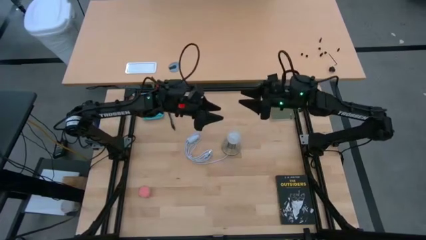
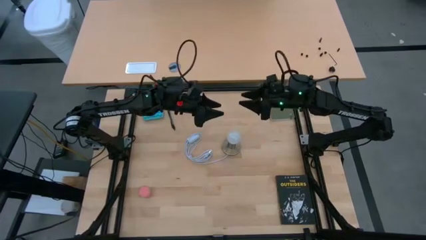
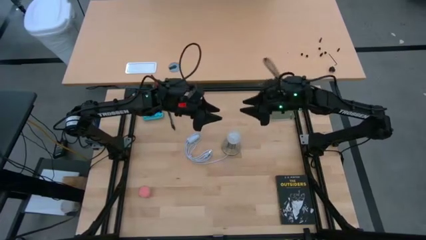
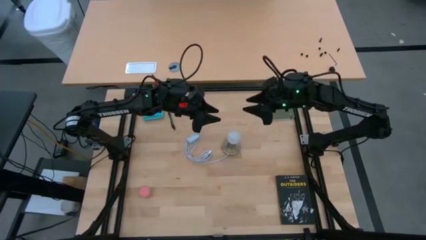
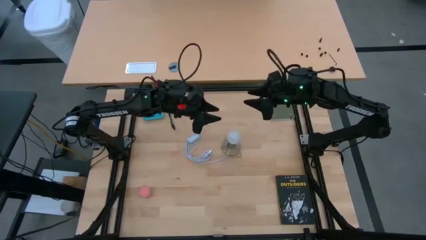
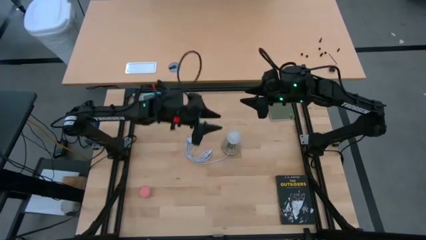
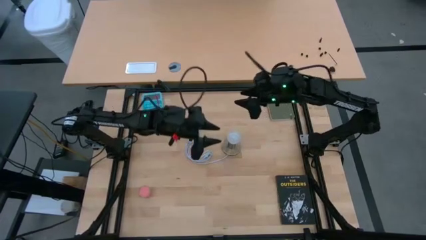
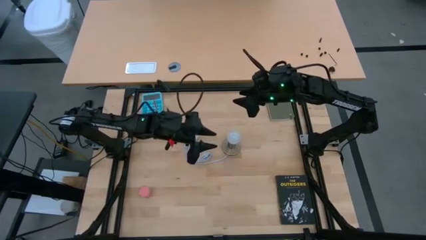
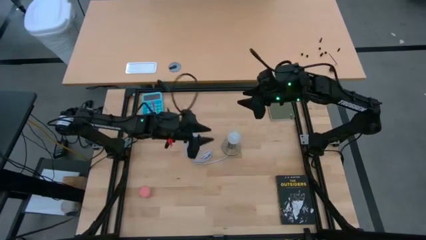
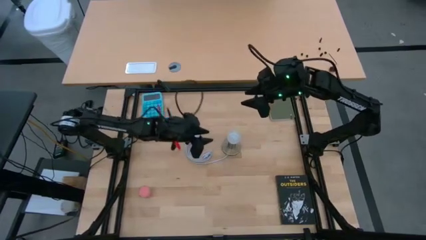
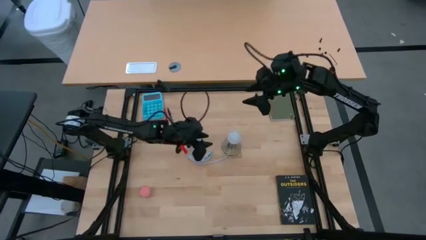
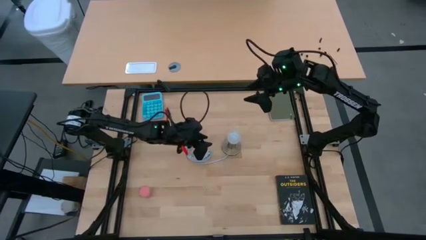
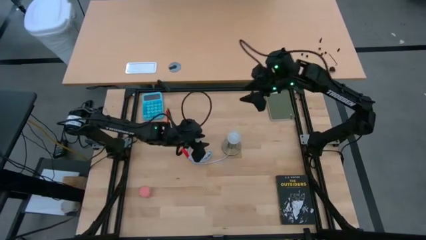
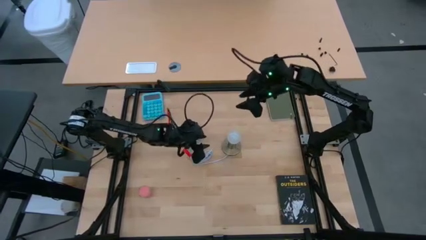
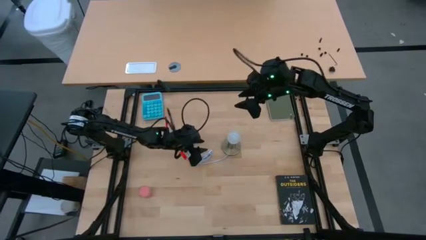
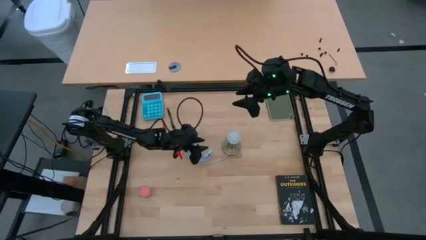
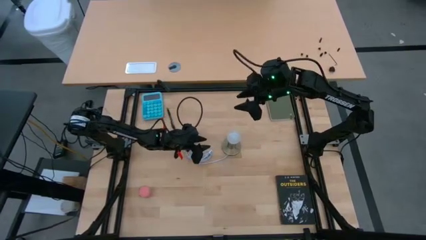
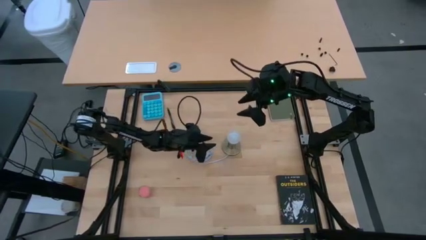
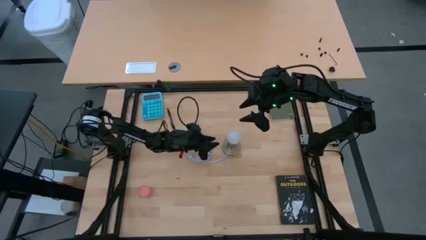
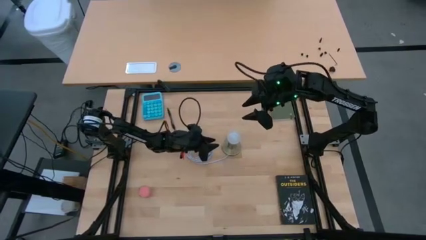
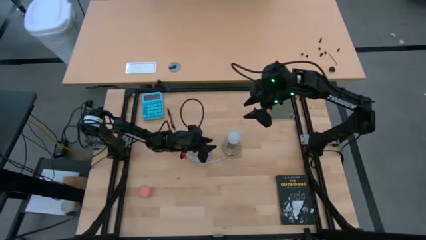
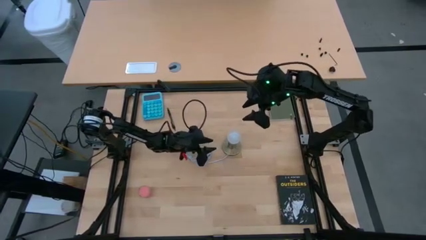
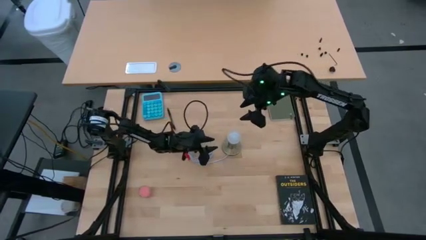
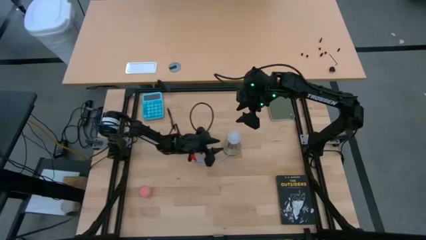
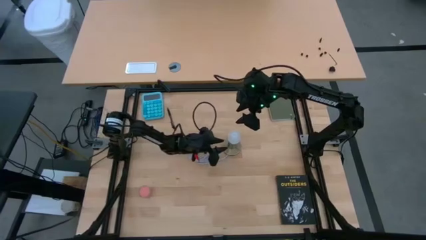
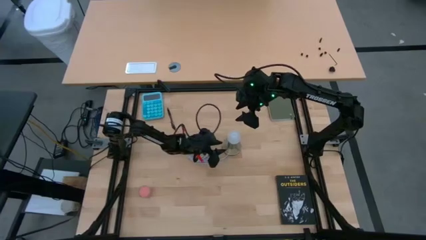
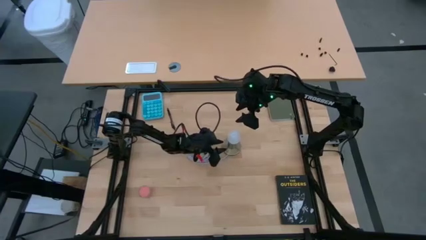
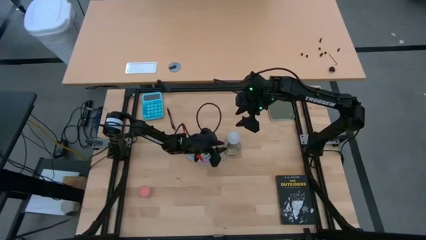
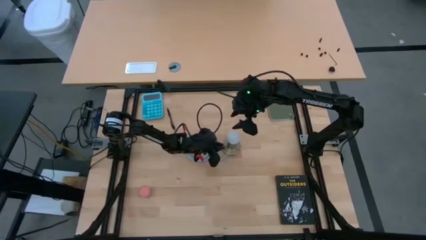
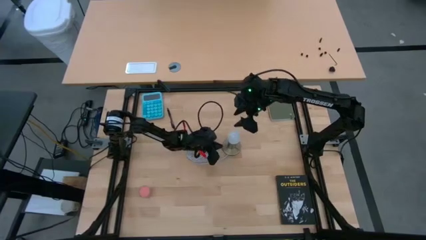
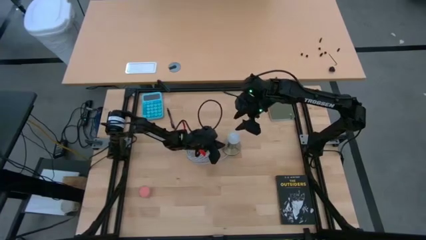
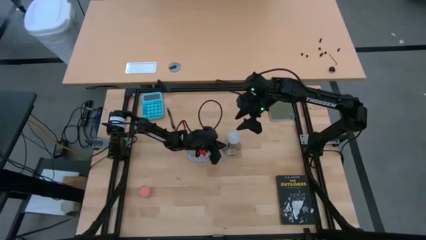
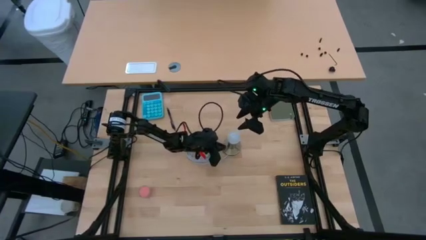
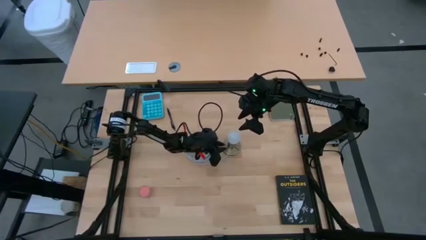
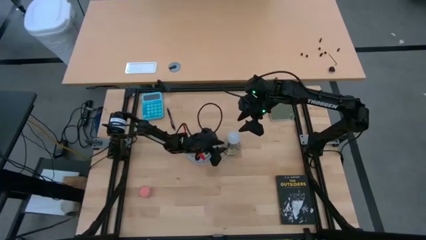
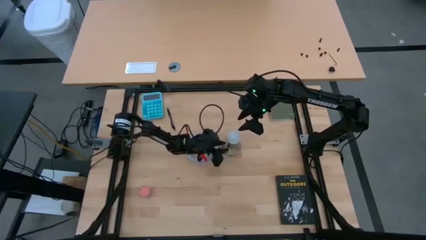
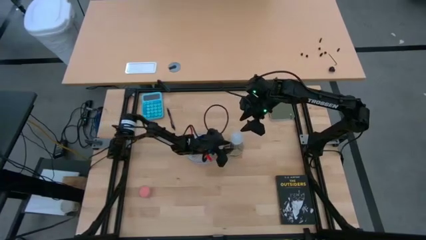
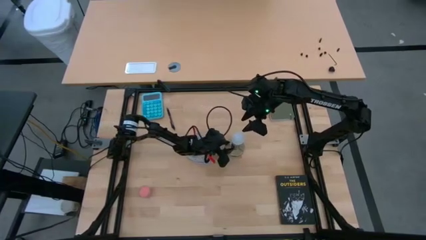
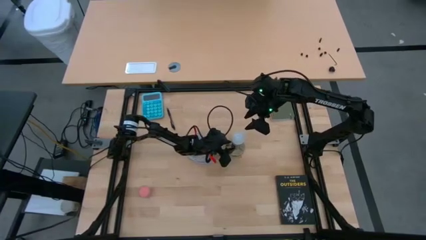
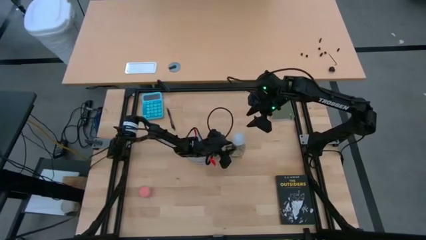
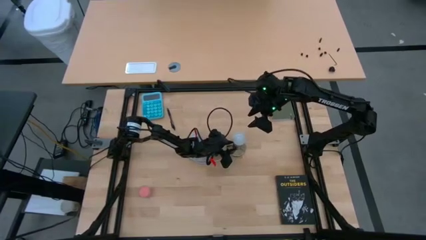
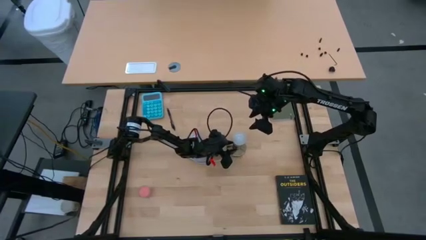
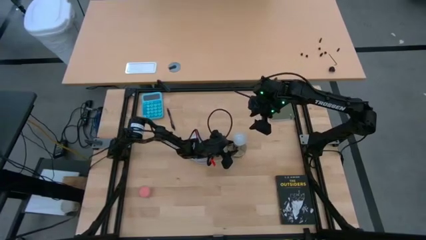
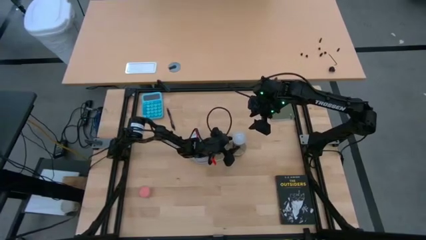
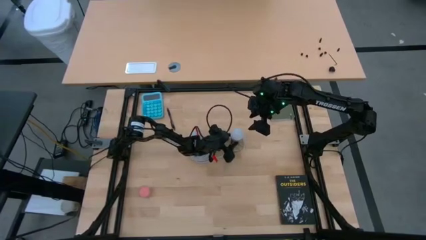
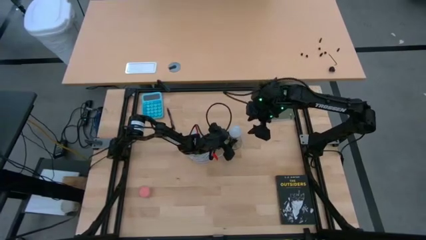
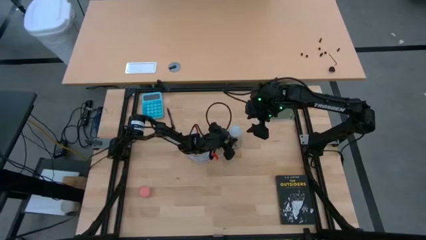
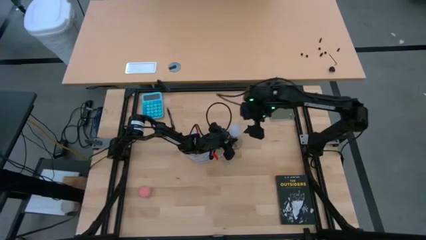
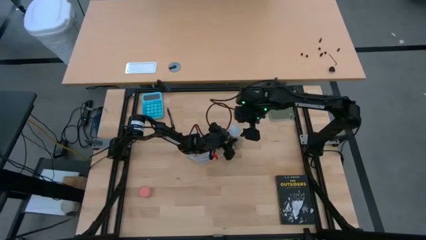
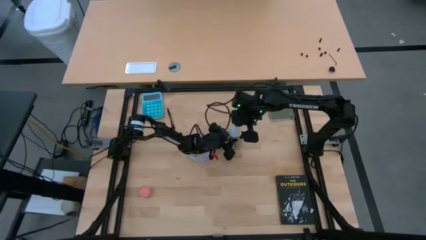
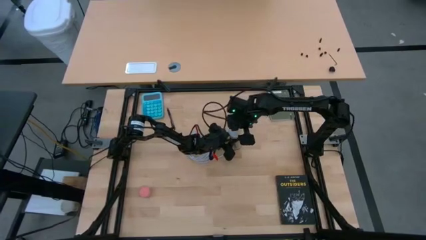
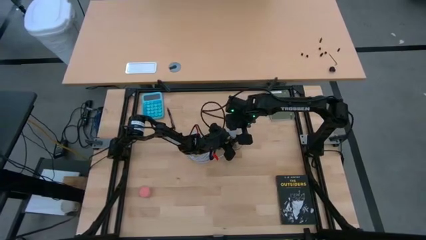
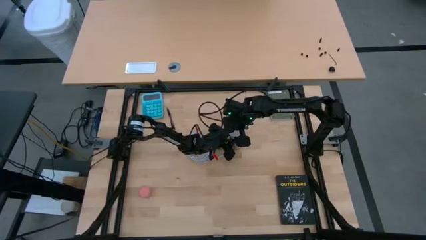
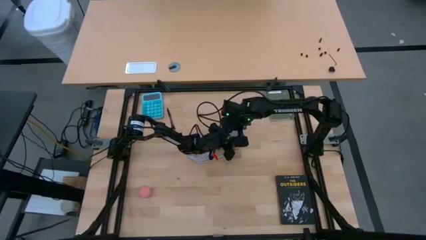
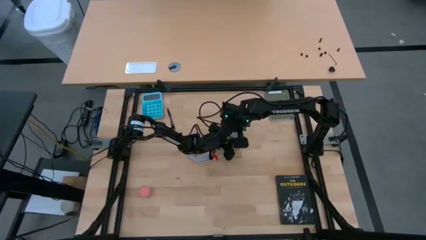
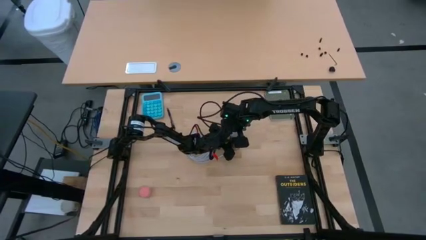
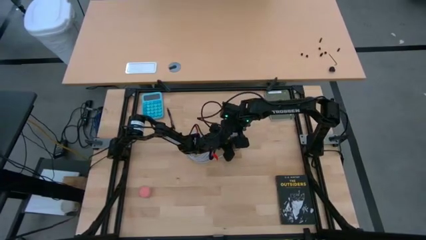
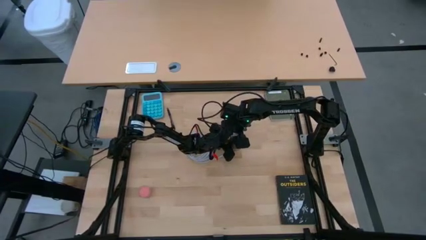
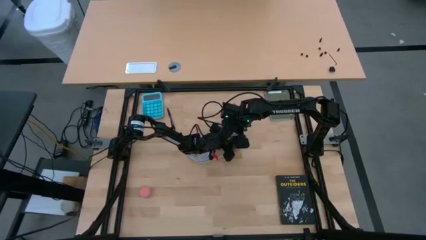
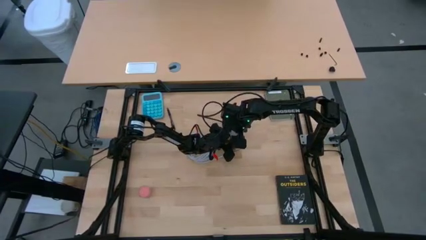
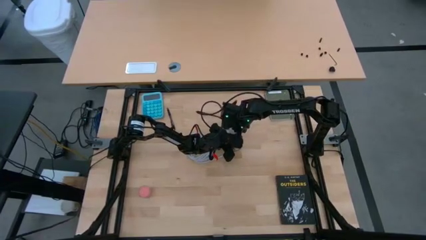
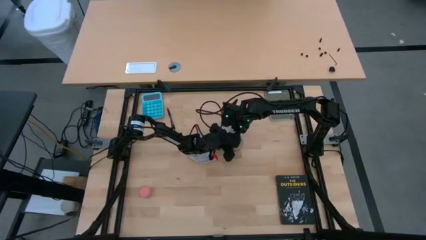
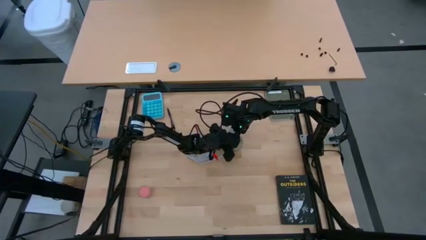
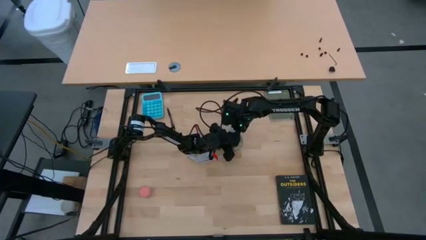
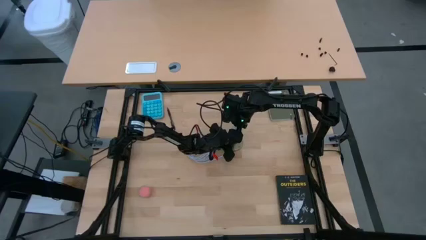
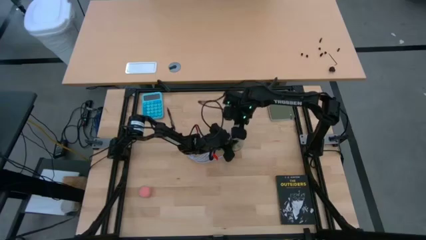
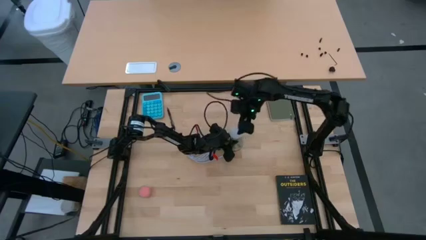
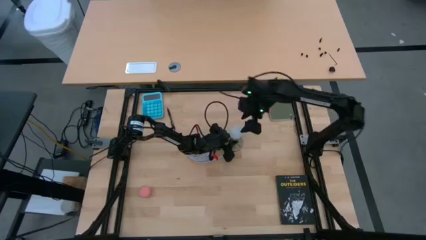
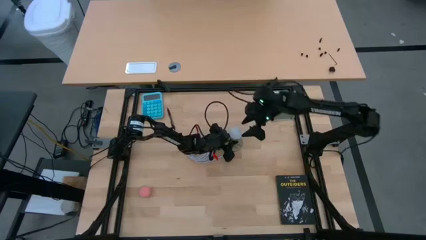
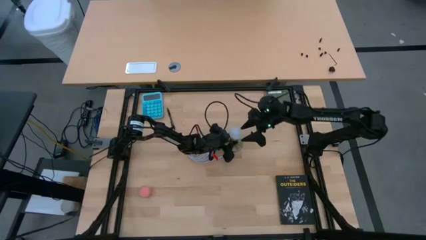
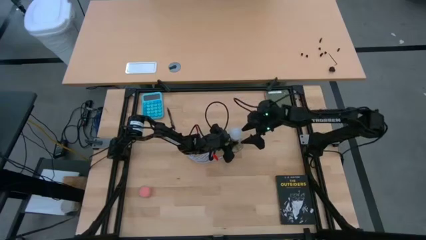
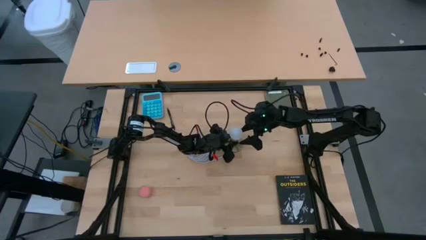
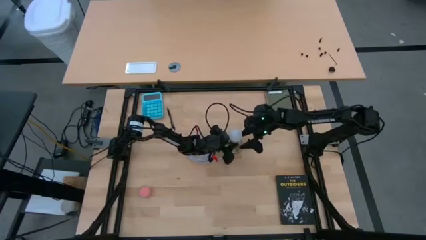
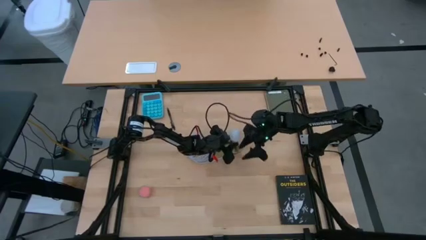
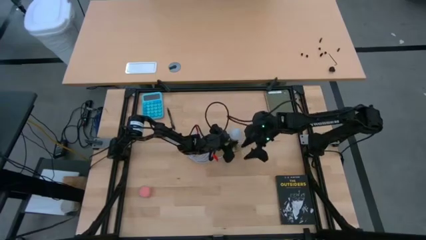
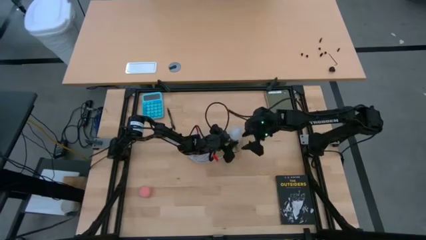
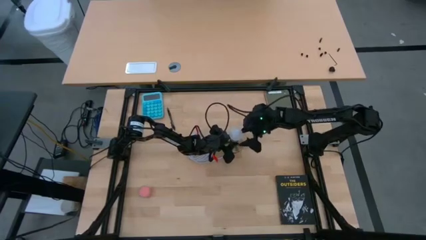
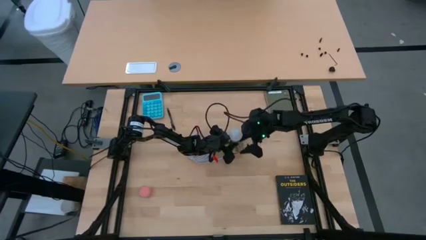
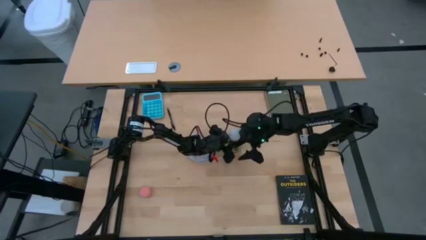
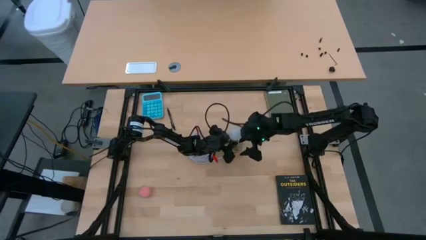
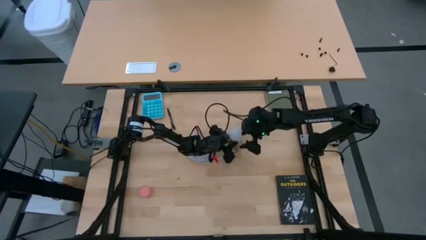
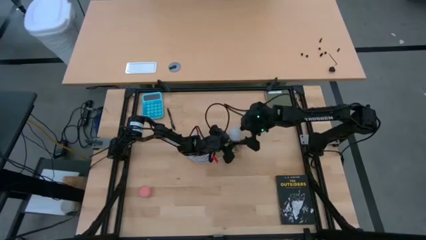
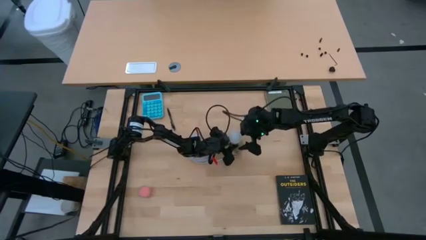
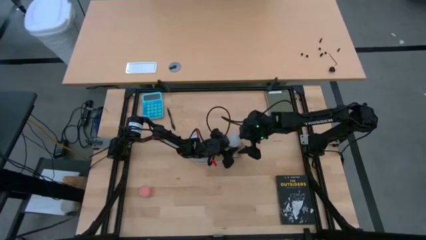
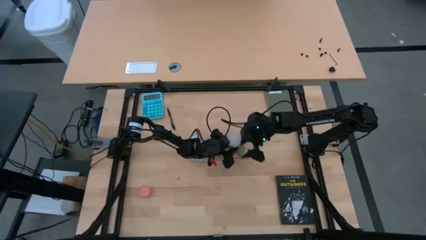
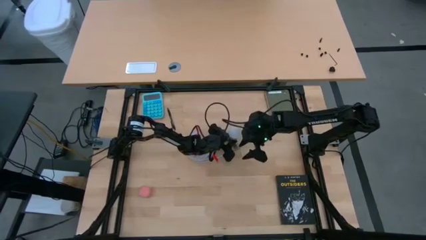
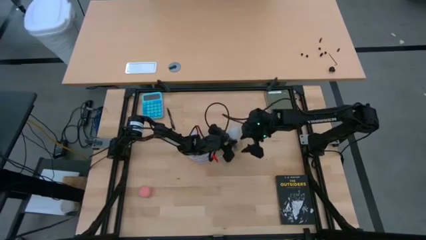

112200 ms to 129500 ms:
Task: Screw lightbulb
Insert the white lightbulb into the desk lamp
